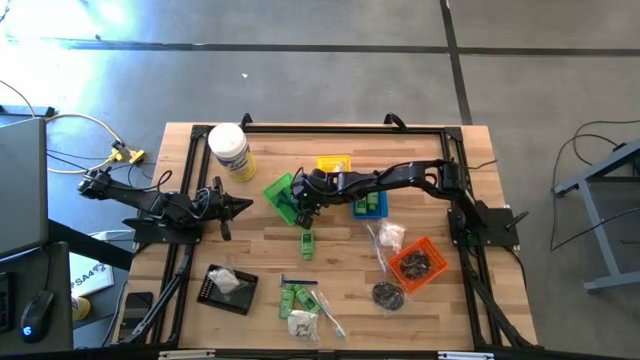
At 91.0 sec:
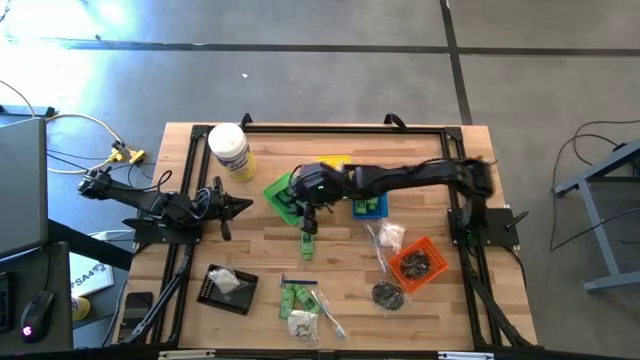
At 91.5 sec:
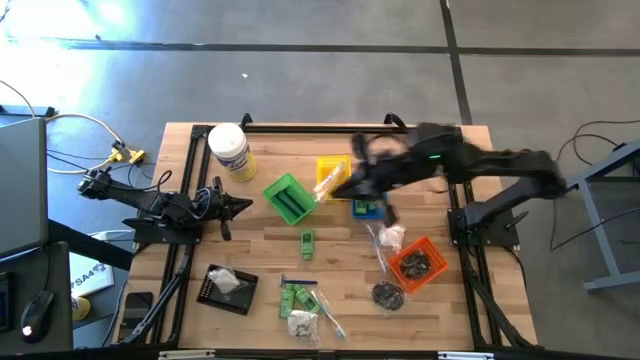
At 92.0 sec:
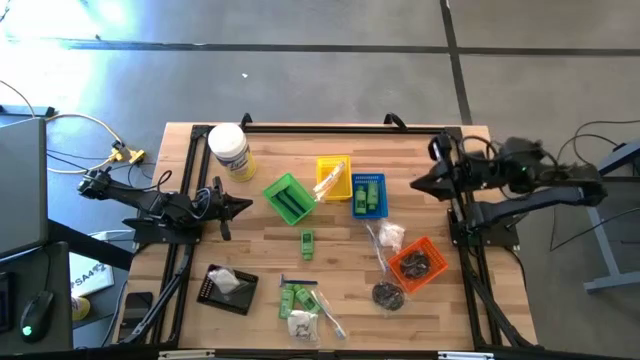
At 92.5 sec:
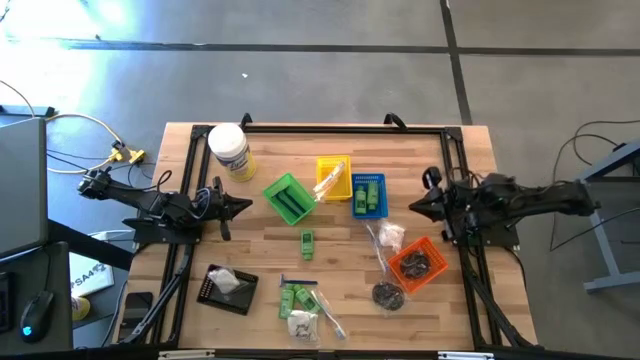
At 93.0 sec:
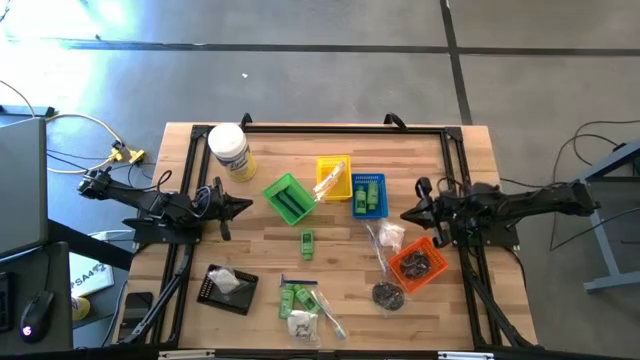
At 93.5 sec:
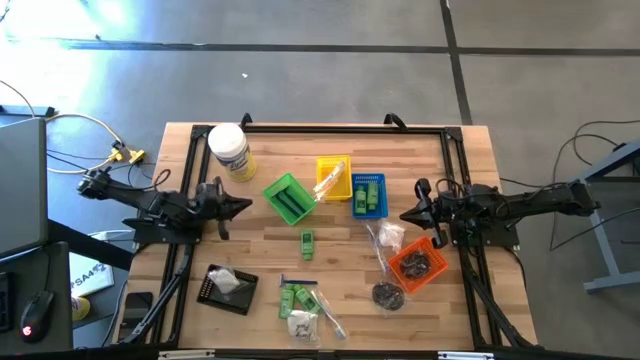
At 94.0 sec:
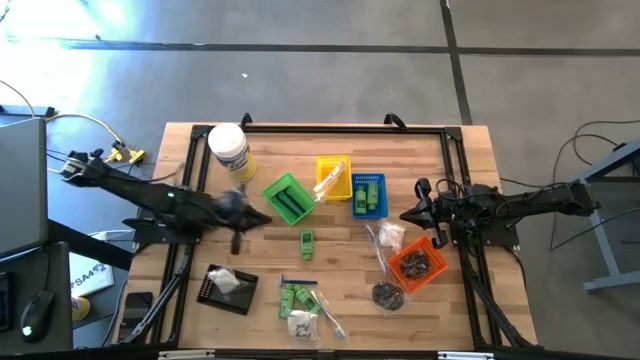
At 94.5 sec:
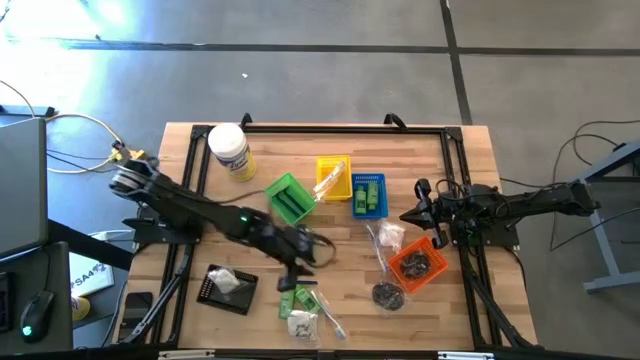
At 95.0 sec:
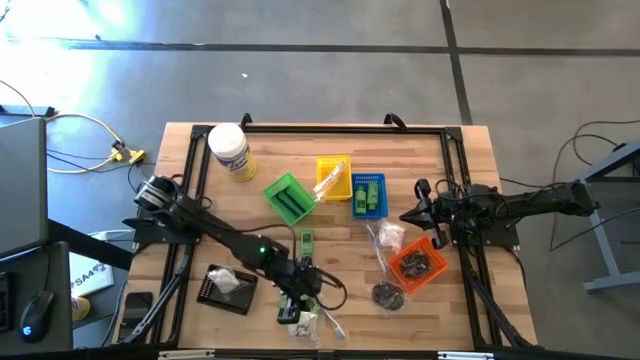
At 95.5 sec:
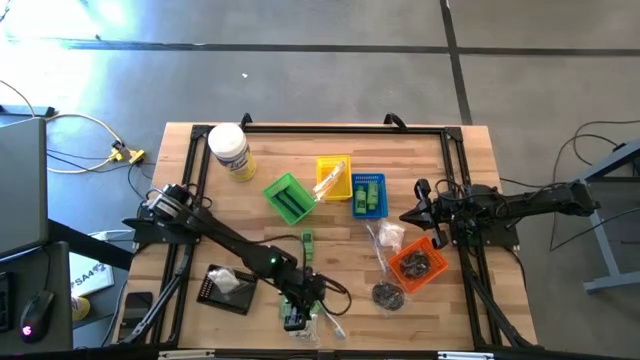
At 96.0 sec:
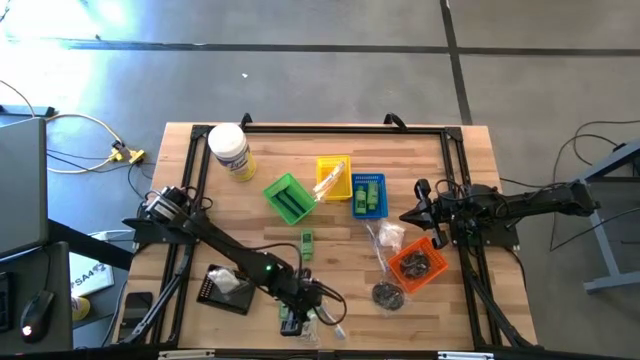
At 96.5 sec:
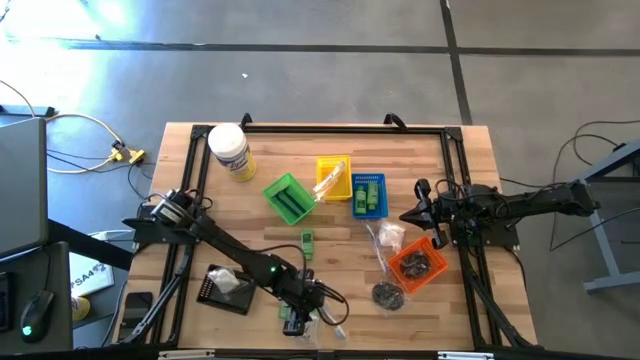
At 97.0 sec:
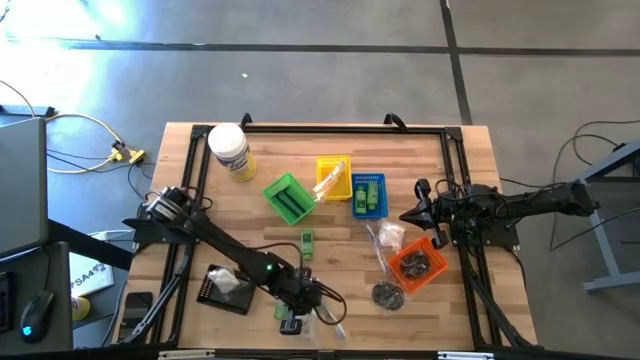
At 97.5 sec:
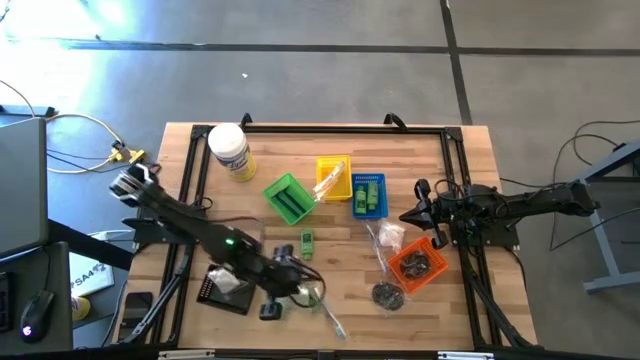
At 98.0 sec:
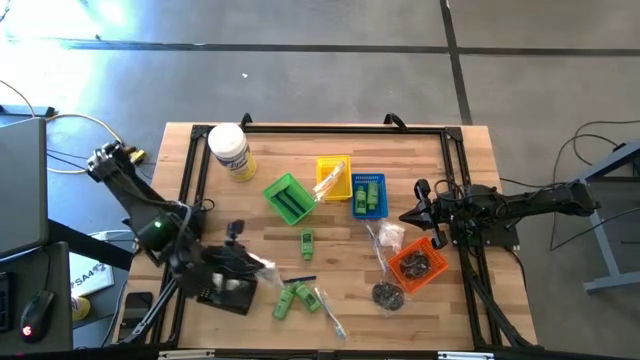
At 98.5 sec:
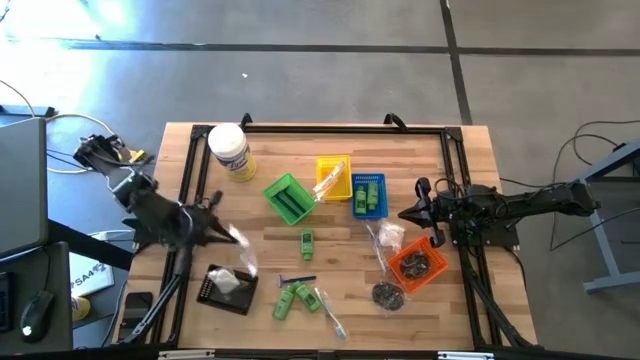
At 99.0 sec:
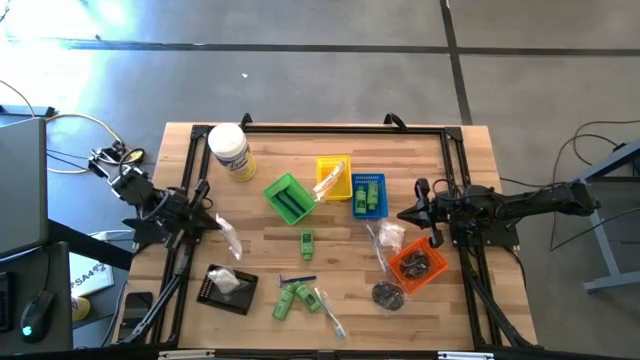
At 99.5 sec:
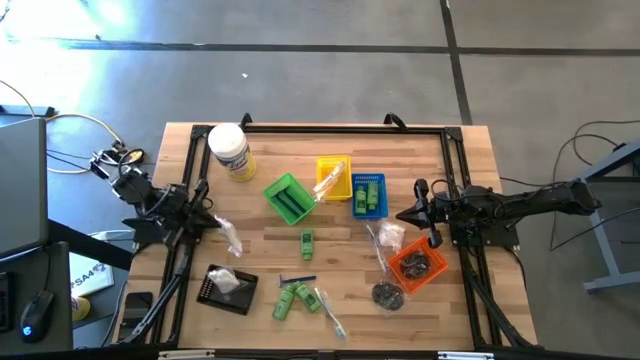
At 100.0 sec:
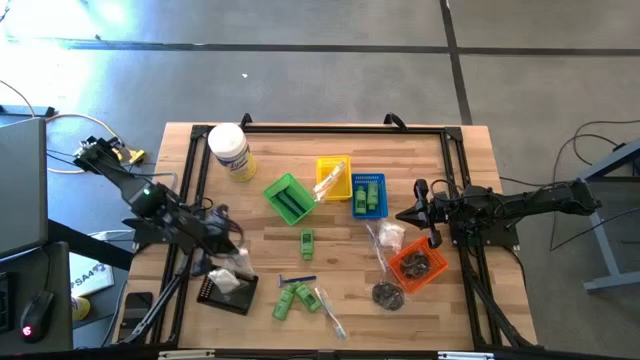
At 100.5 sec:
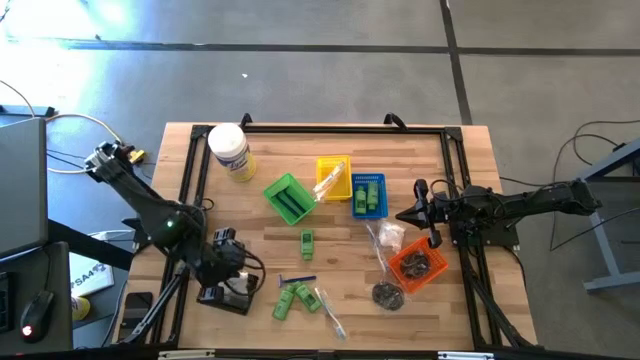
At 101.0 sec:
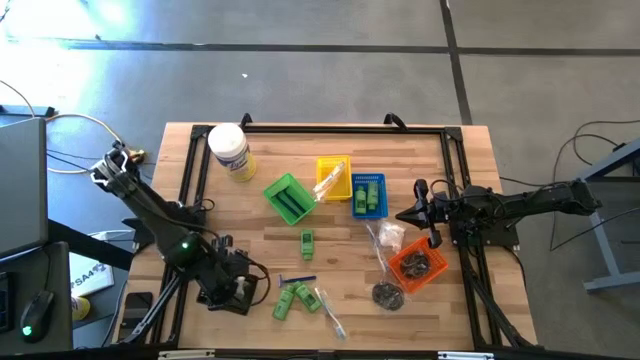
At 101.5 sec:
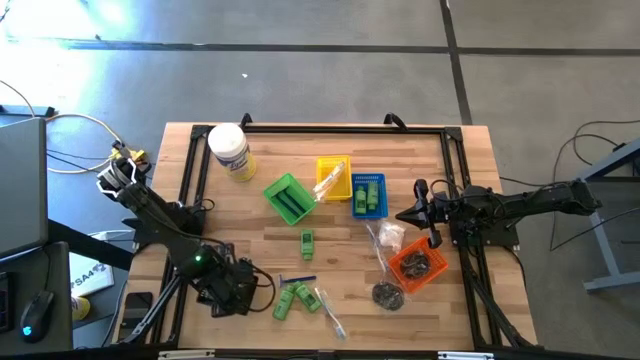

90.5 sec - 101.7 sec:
Task: Pick & Place Travel size toiletries
Put the cotton pack into the black basket

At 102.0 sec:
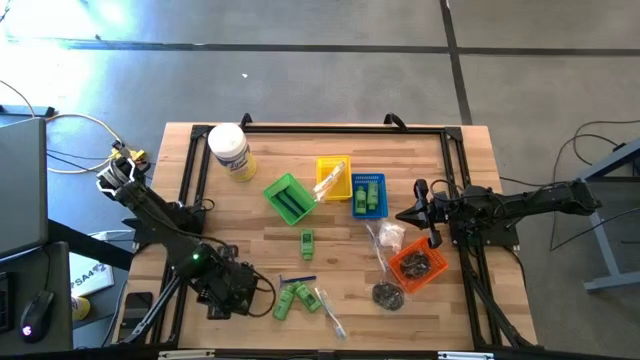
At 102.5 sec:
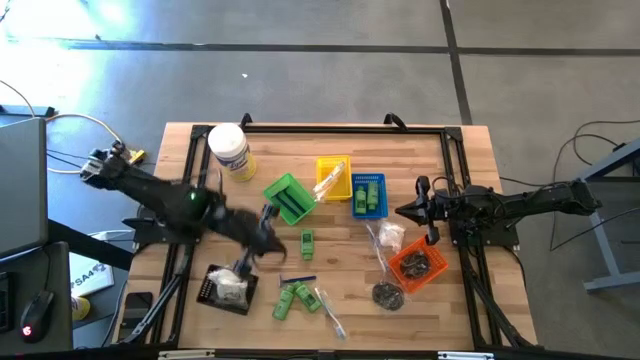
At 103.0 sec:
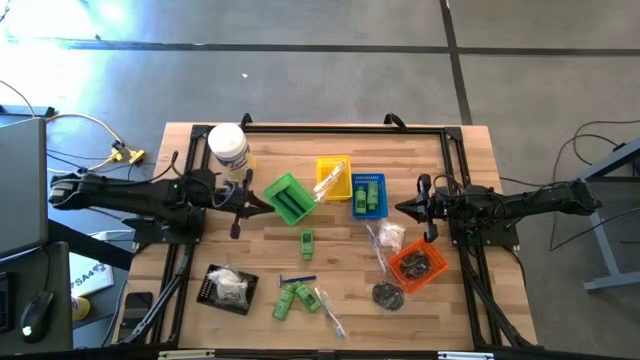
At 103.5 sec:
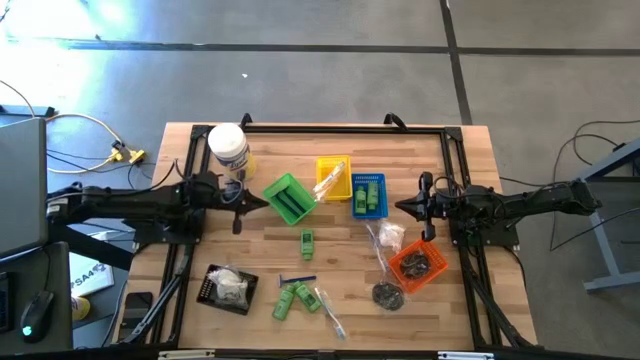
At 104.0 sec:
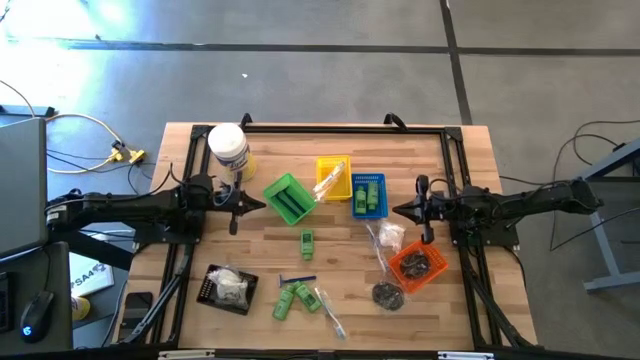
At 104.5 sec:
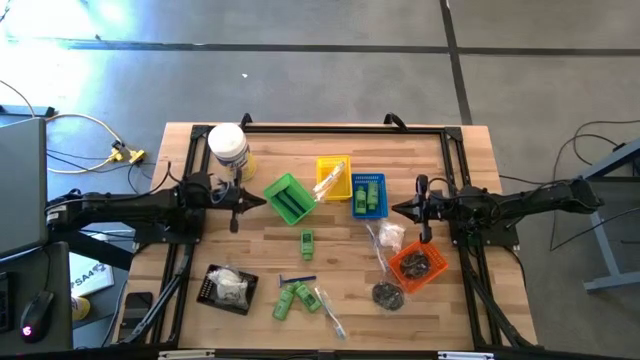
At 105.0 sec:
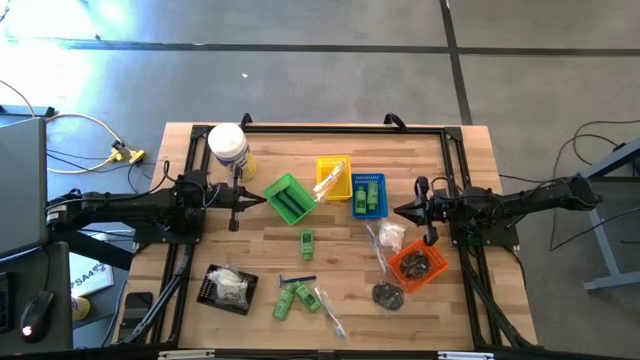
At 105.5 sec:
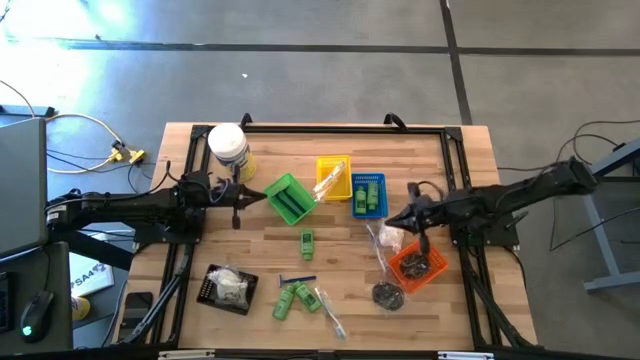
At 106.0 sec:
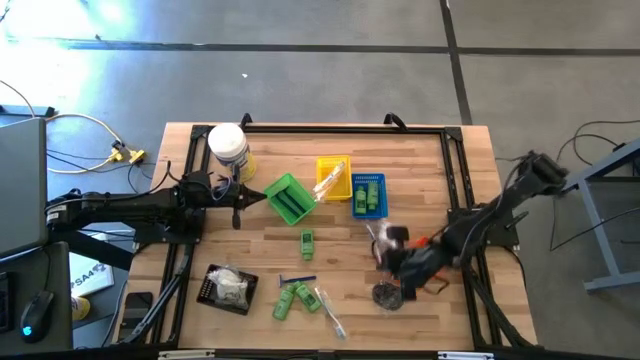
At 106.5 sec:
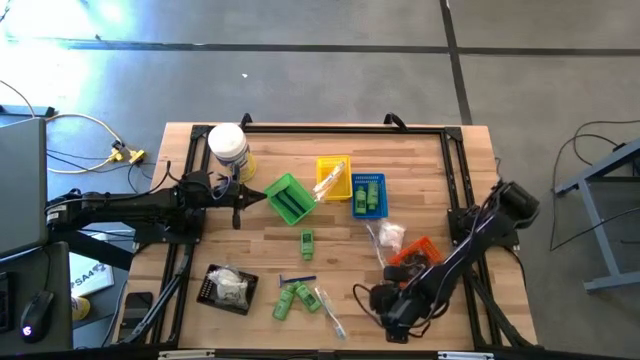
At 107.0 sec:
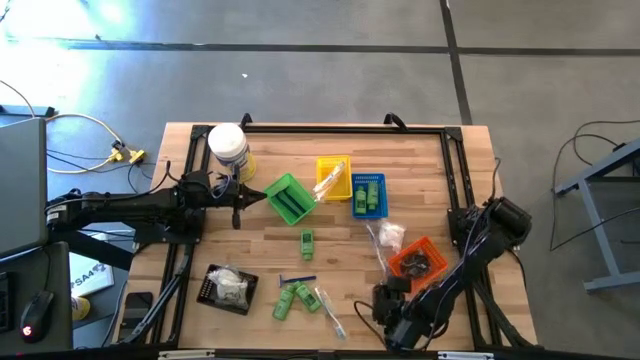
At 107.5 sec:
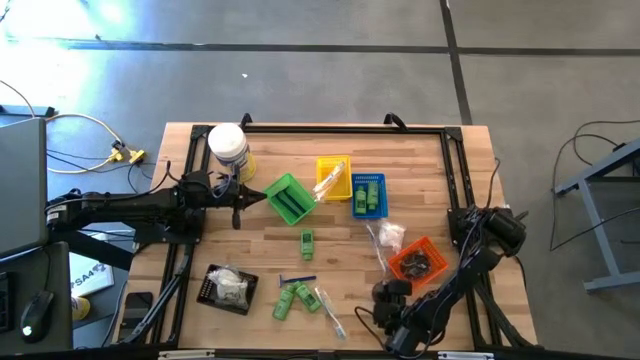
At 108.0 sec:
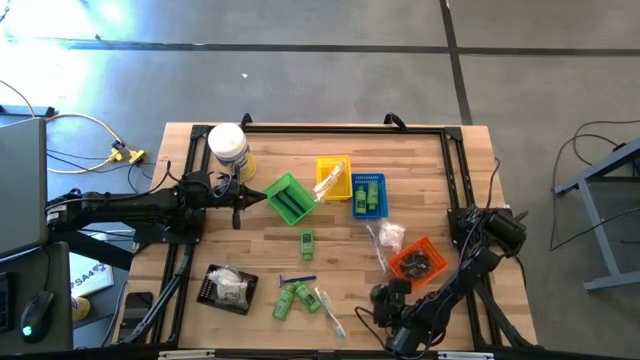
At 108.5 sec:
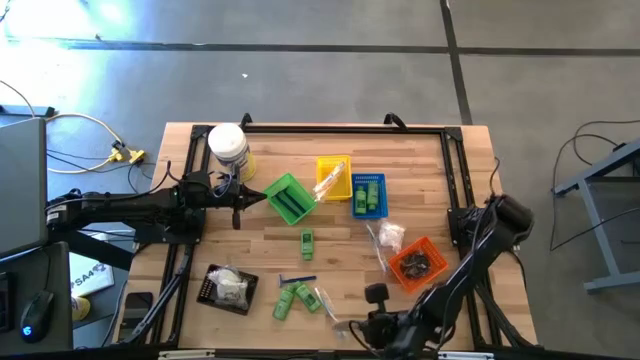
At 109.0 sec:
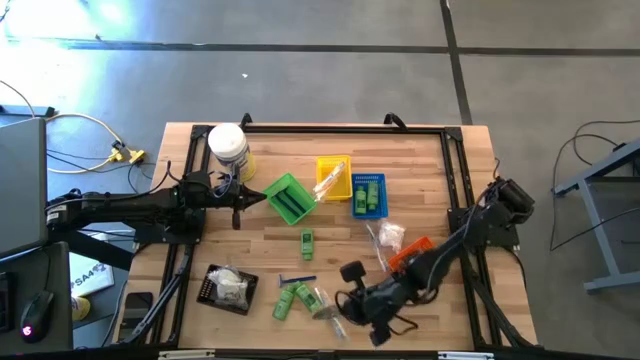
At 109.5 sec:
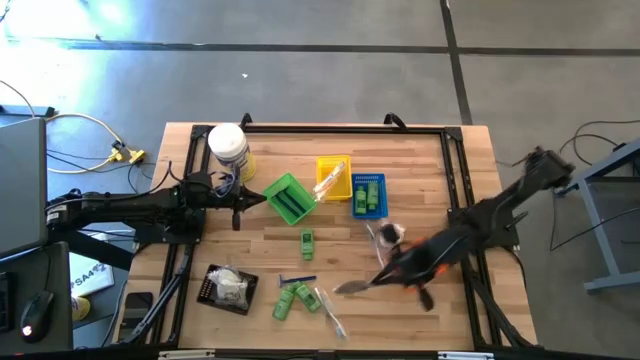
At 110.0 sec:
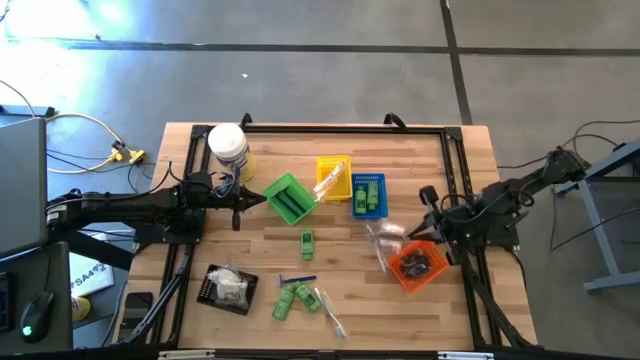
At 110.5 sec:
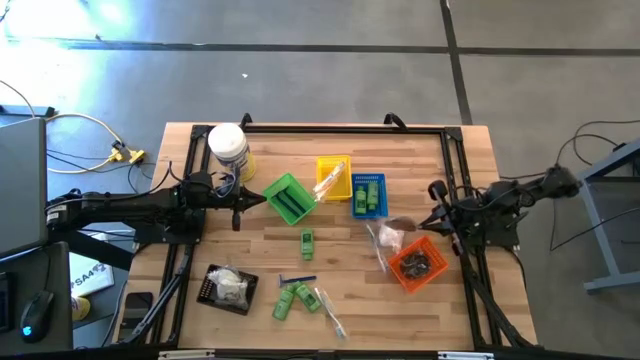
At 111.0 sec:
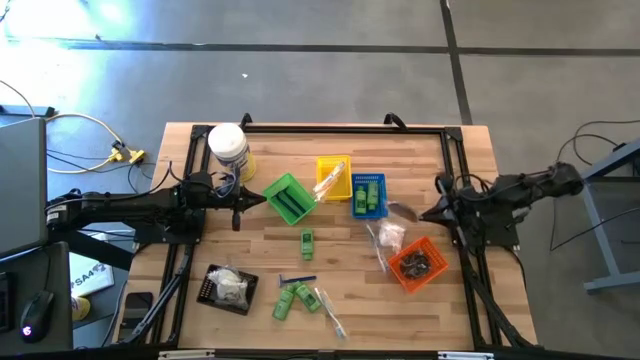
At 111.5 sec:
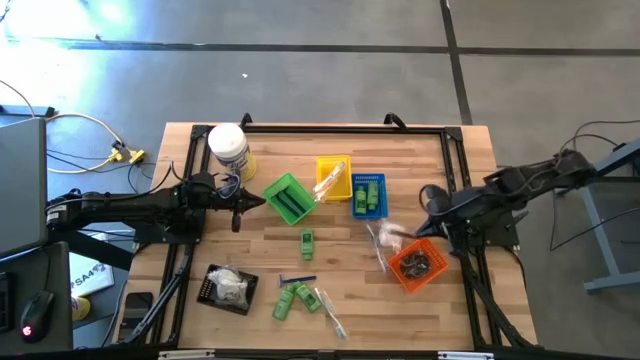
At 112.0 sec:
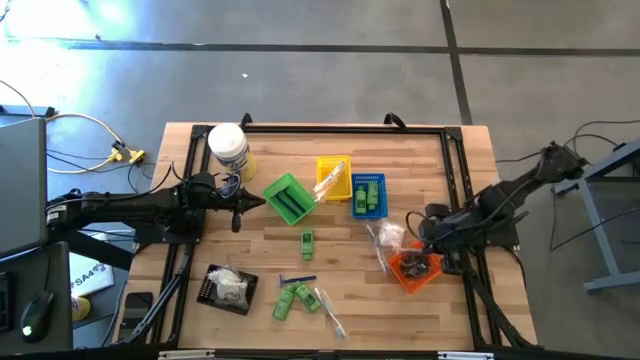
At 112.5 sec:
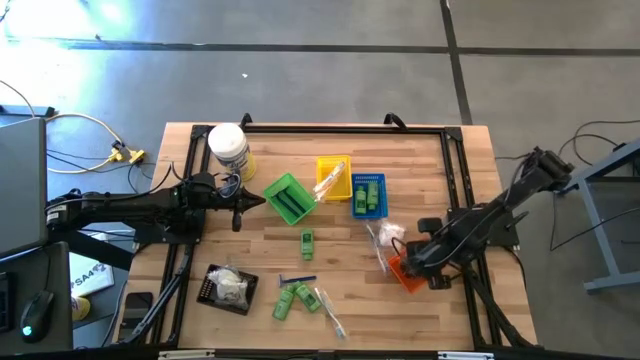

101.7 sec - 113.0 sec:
Put the black hairbrush into the orange basket
